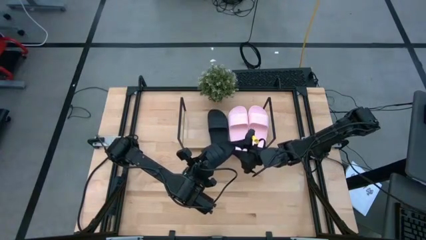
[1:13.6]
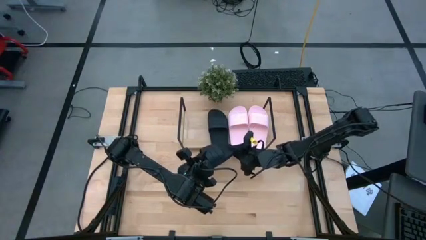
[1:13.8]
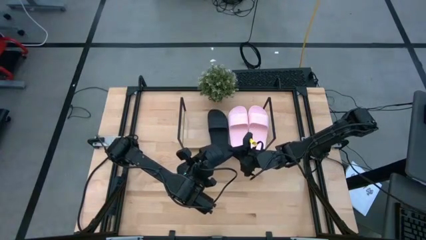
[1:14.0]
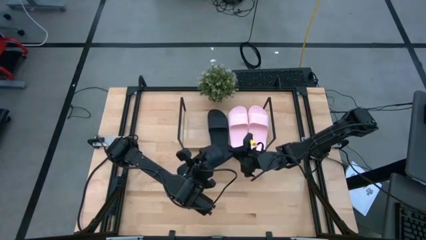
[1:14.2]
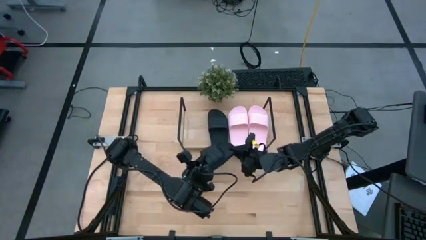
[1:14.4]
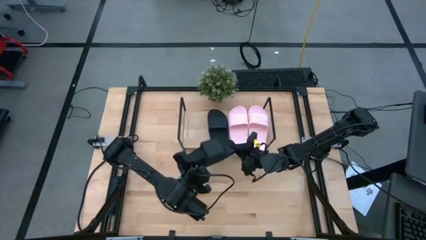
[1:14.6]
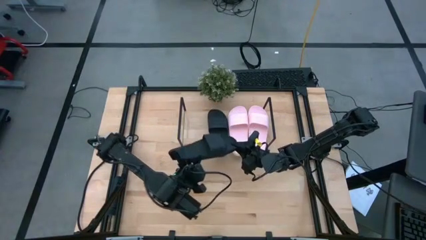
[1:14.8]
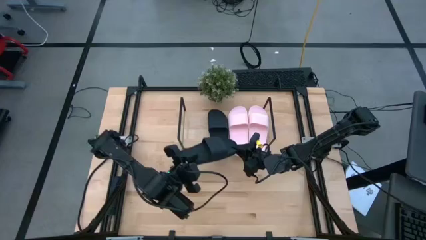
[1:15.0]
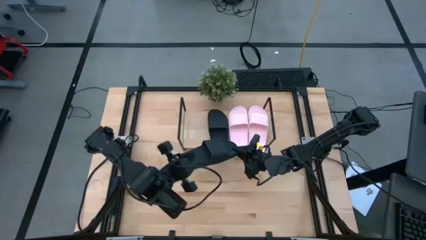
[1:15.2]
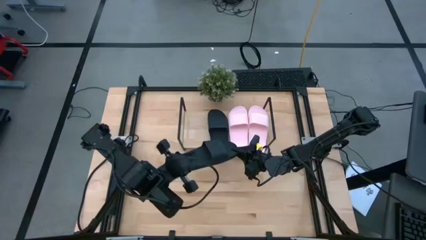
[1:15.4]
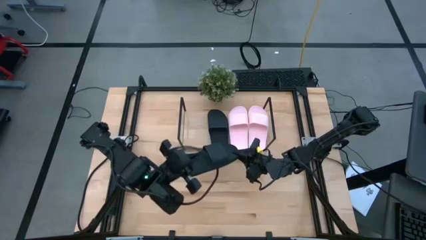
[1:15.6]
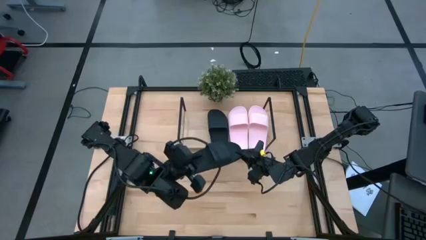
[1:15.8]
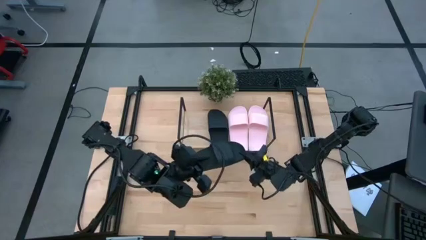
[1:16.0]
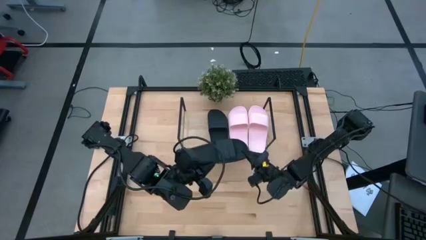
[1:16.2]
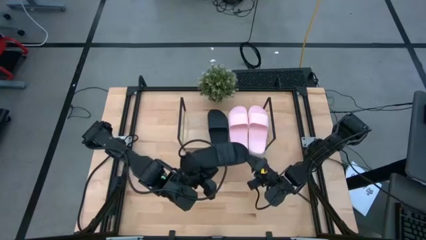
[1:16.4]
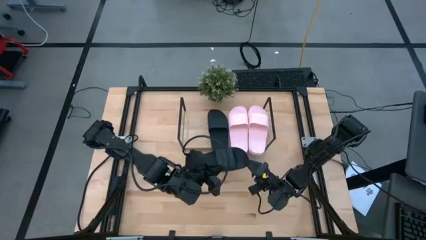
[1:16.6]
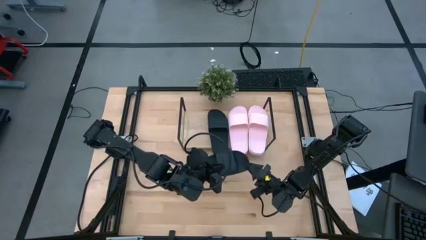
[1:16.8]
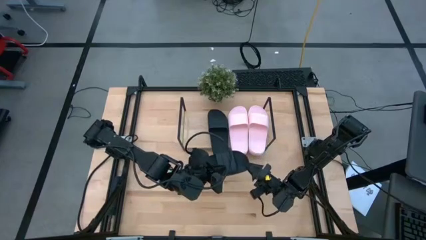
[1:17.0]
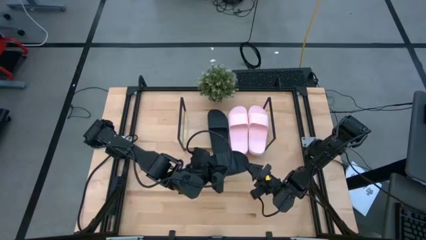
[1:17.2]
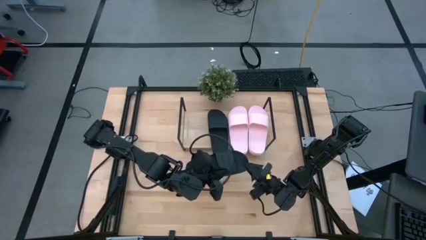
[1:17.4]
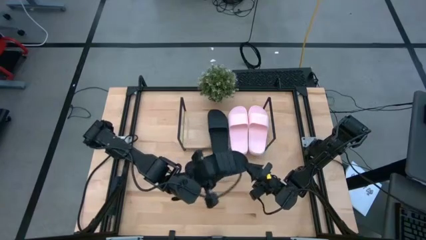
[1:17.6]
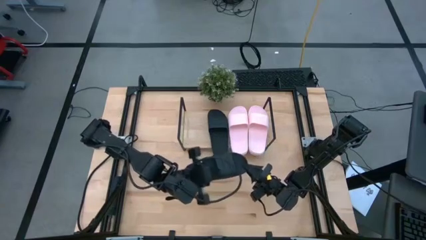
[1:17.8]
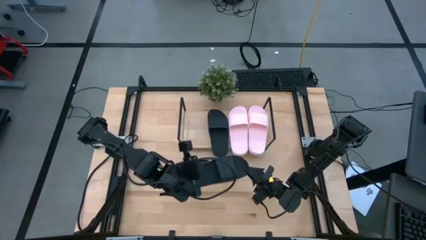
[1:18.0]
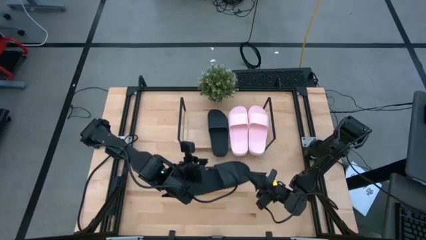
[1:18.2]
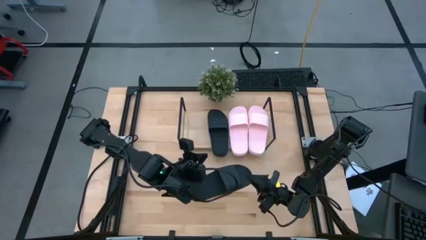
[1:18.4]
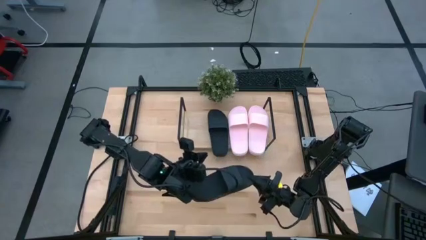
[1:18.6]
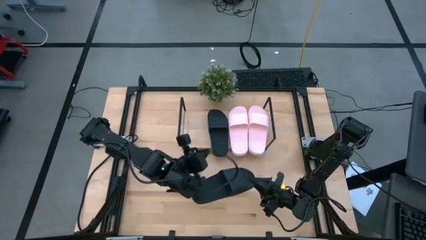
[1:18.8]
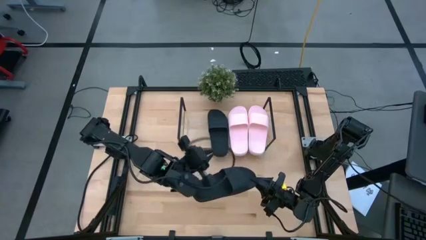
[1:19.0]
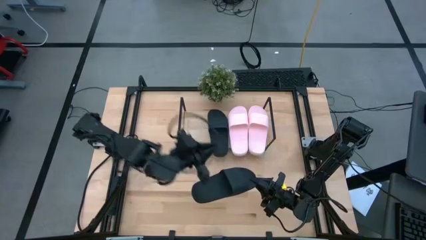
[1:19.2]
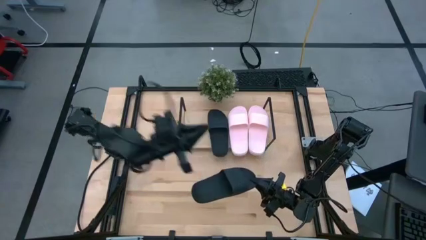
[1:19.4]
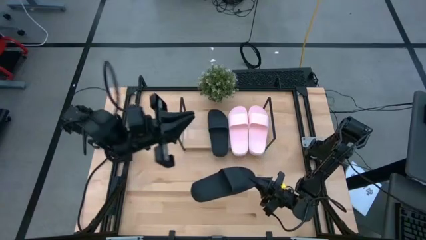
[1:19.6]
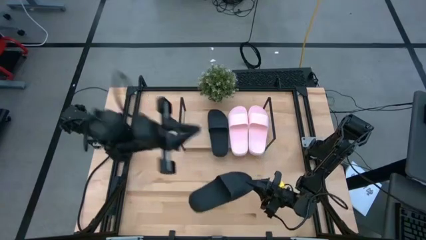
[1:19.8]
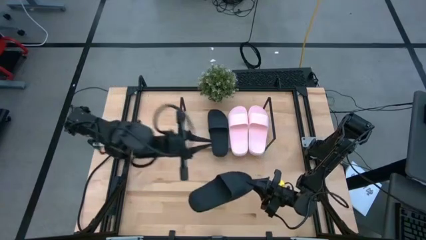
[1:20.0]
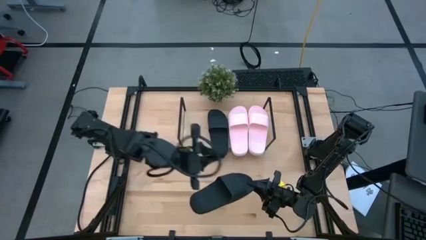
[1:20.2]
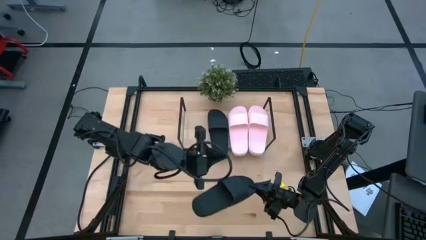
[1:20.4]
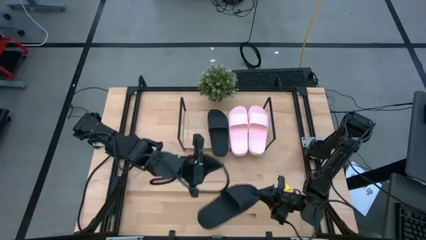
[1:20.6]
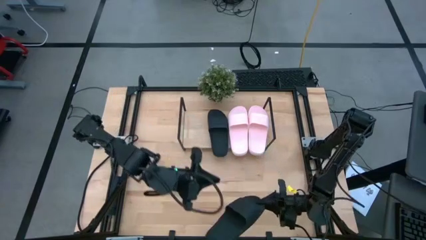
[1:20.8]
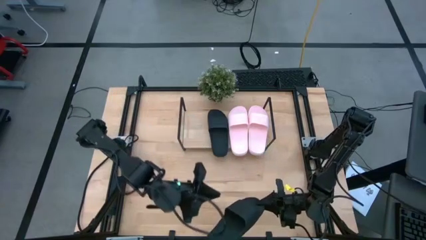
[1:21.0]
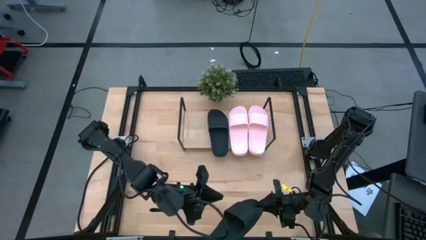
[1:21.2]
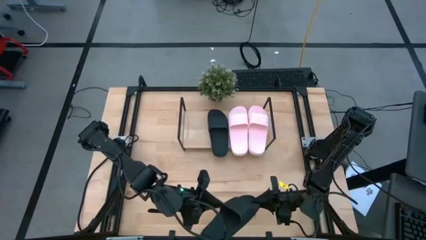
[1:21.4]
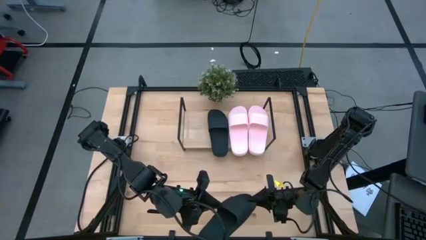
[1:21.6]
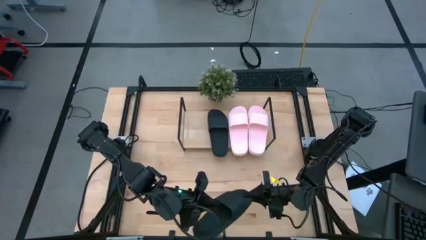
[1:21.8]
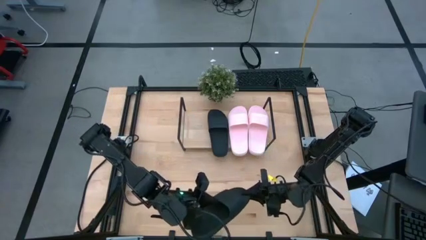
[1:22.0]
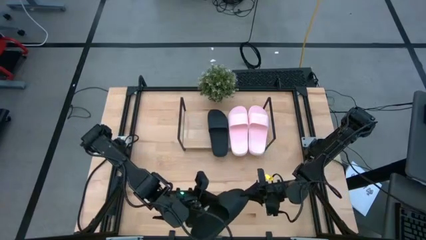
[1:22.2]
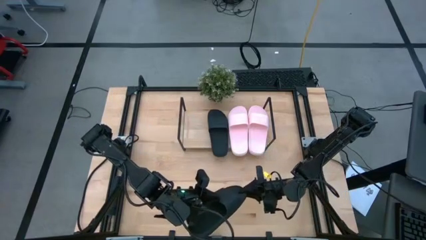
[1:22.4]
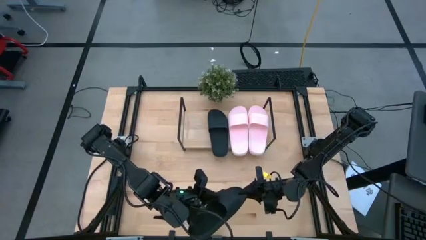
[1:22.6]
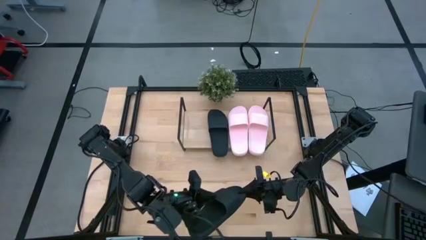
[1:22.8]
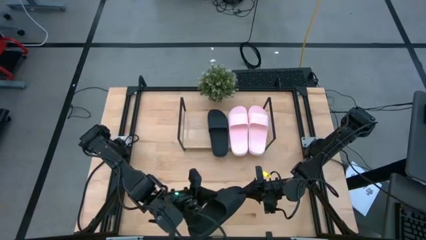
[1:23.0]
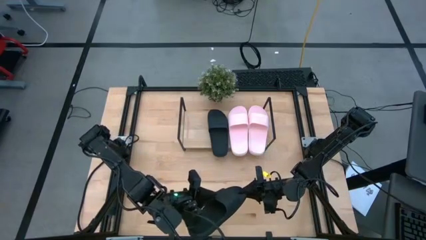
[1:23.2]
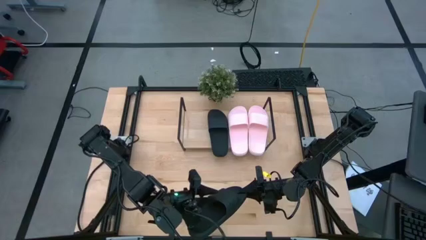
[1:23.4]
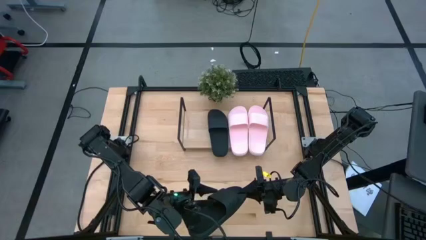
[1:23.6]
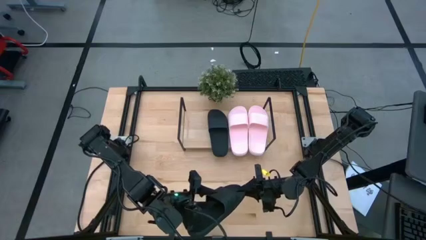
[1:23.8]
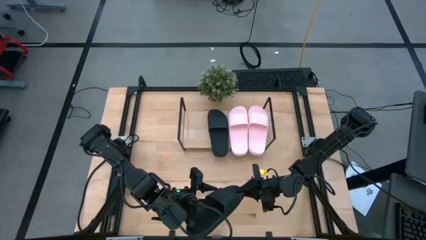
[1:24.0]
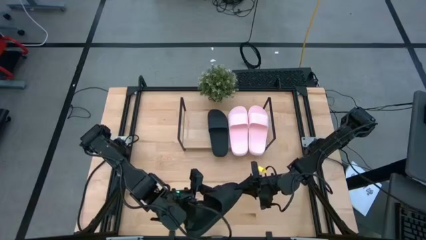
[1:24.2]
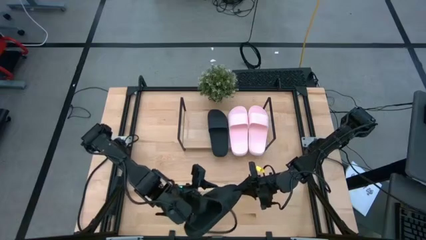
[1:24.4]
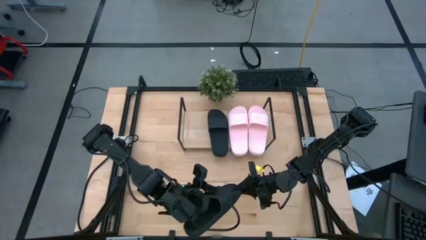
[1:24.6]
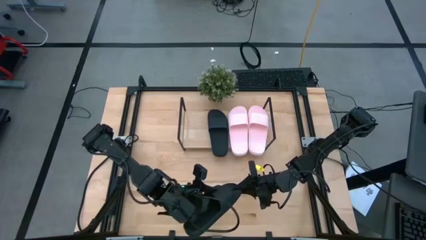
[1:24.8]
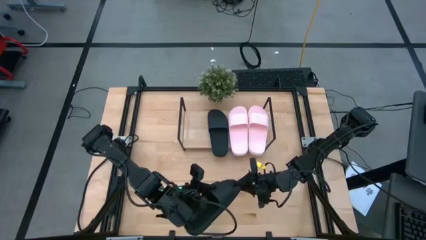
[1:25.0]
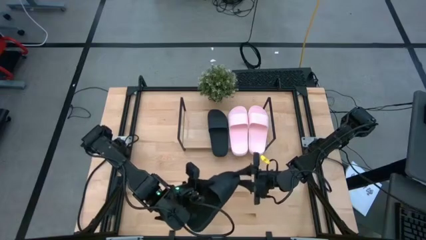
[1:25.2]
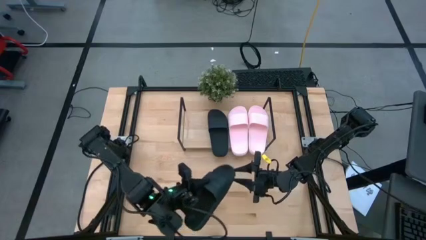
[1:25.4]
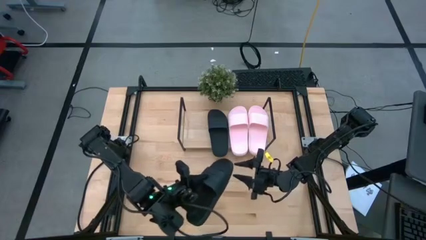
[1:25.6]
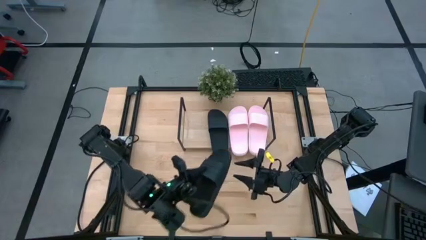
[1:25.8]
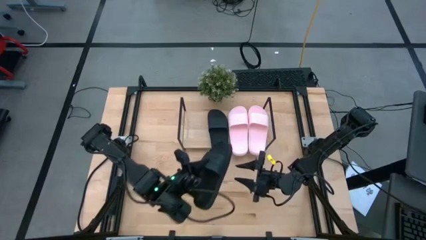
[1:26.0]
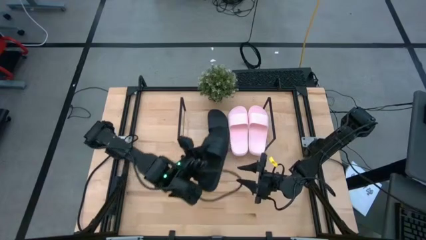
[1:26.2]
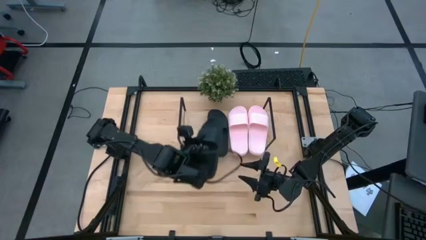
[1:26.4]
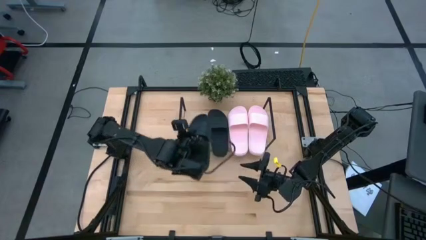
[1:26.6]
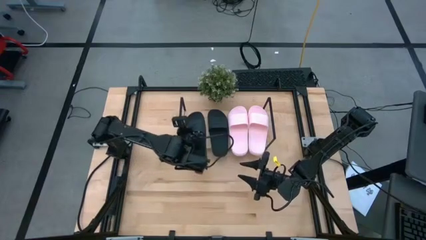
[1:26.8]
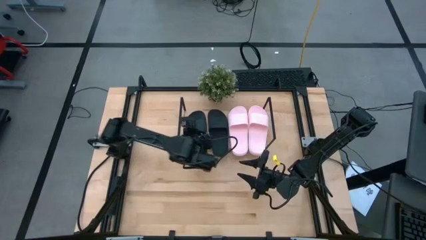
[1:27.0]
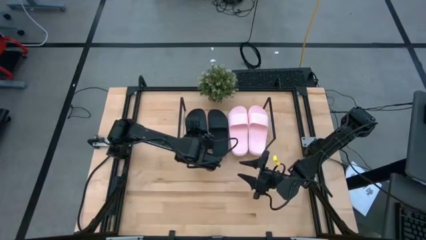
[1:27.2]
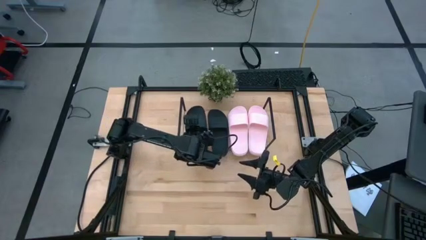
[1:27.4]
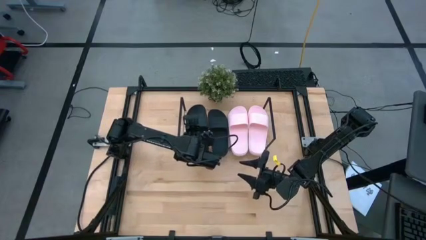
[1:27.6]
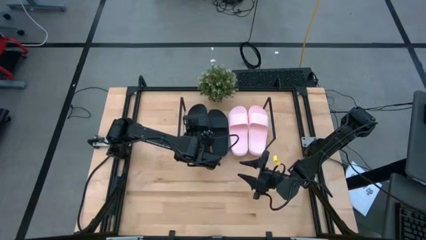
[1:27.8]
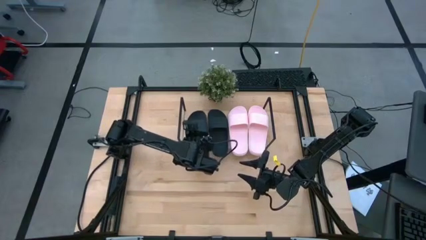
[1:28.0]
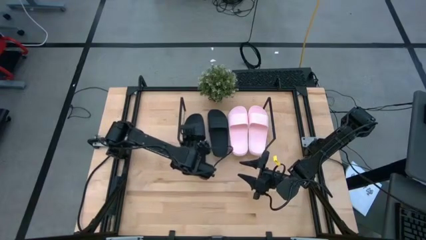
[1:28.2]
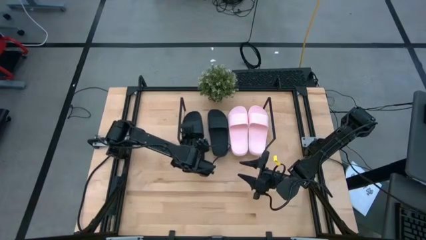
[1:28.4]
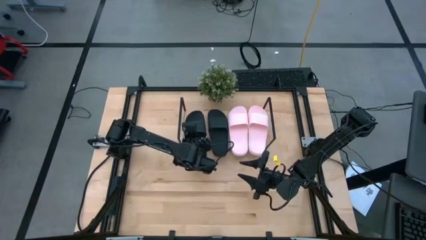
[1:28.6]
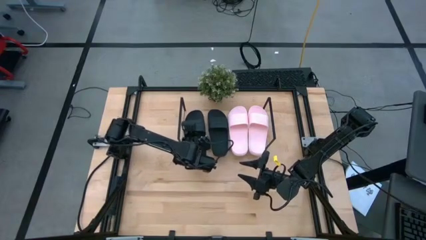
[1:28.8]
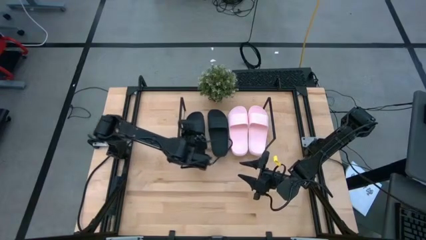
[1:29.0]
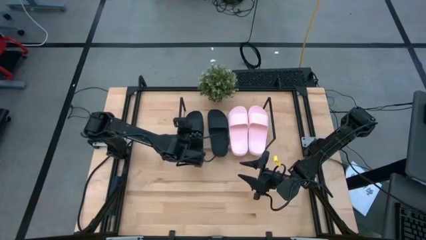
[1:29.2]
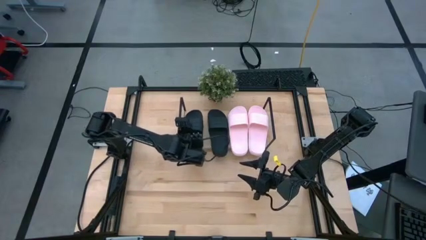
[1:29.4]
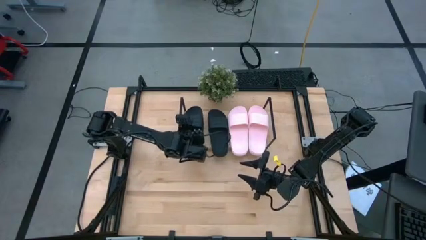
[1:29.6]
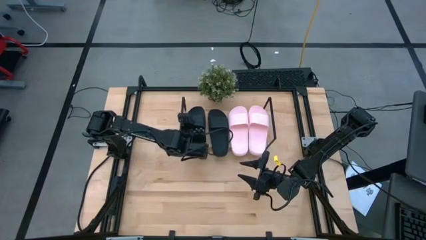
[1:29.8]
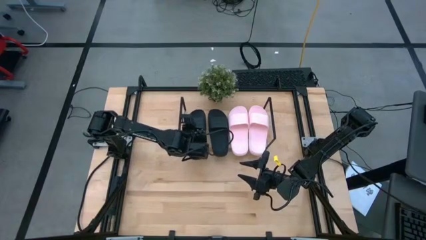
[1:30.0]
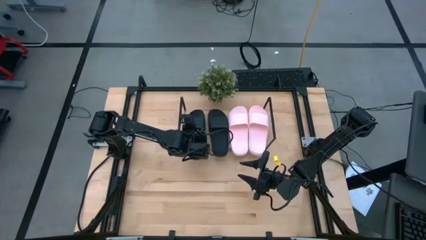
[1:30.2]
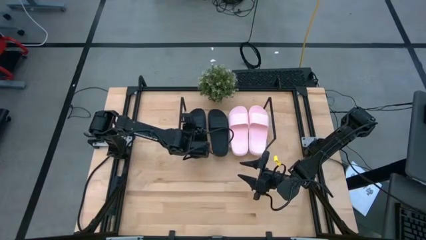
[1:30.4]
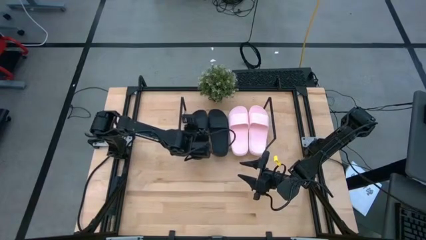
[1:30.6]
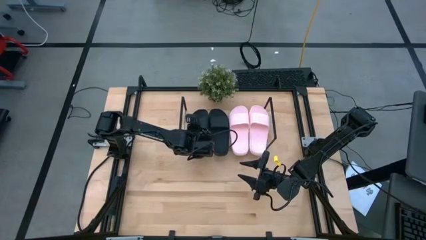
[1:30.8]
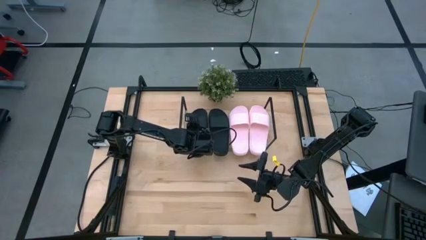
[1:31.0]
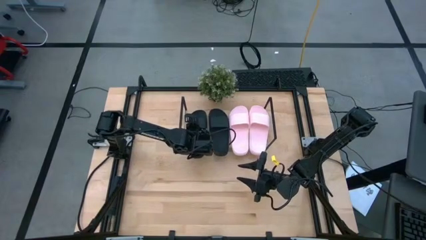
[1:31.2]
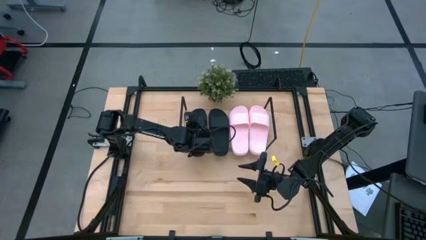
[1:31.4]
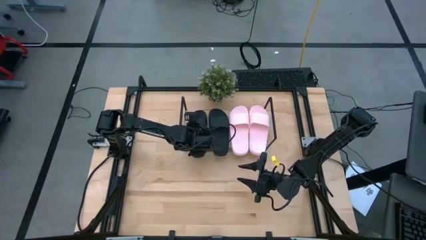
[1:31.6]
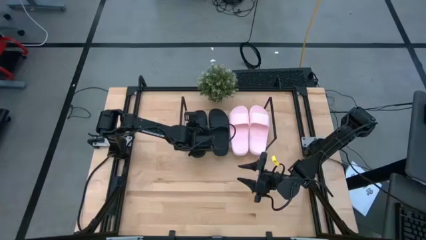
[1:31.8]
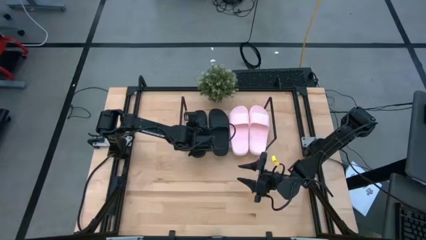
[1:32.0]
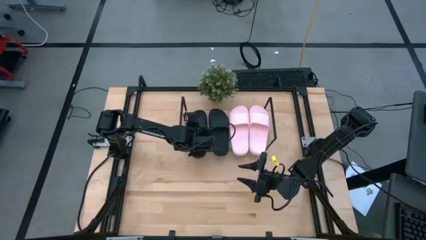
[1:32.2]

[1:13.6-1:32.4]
Task: Pick and place slides into the shelf
Put the black slides on the shelf
